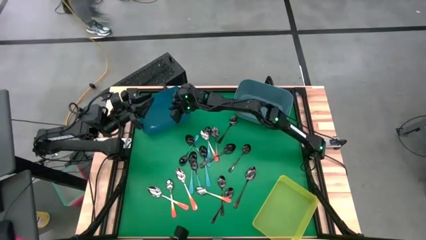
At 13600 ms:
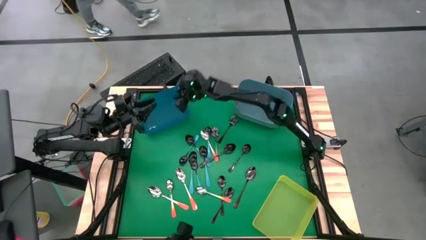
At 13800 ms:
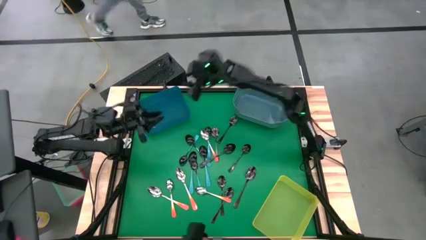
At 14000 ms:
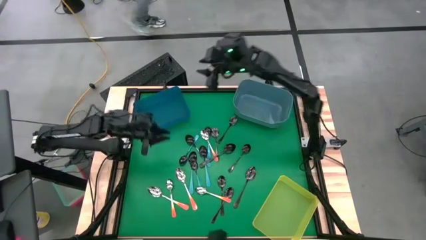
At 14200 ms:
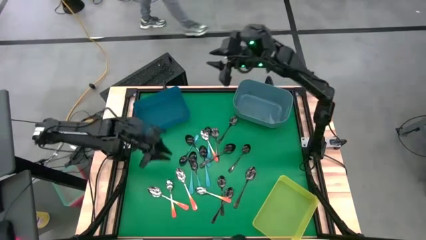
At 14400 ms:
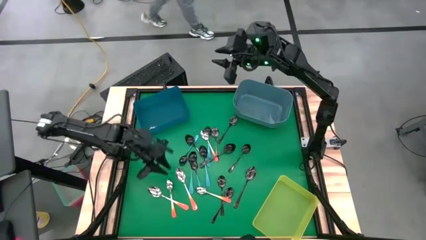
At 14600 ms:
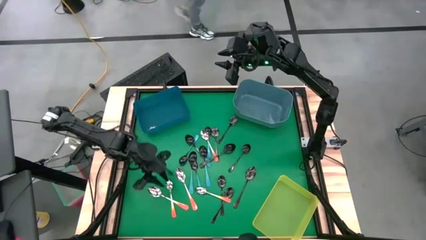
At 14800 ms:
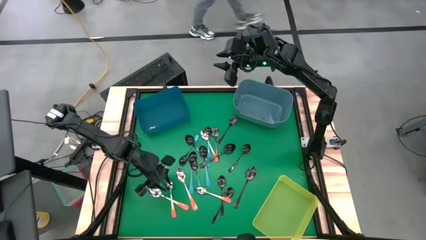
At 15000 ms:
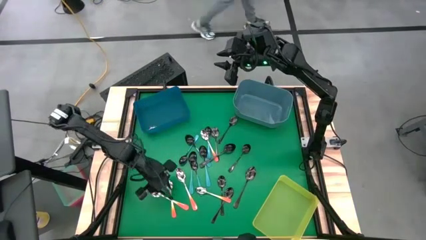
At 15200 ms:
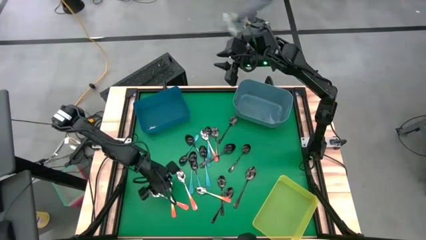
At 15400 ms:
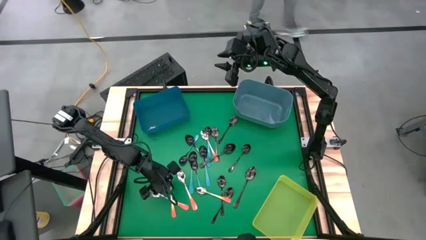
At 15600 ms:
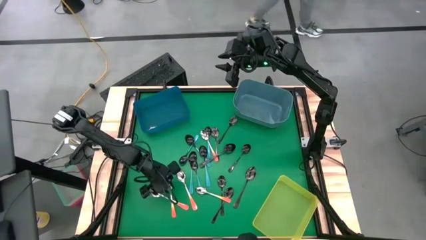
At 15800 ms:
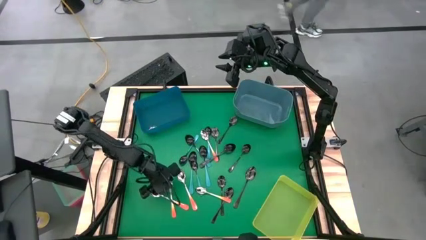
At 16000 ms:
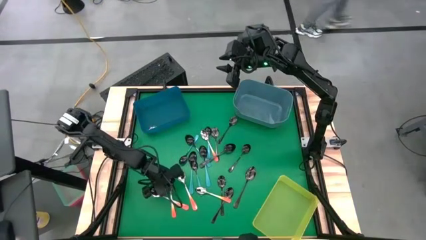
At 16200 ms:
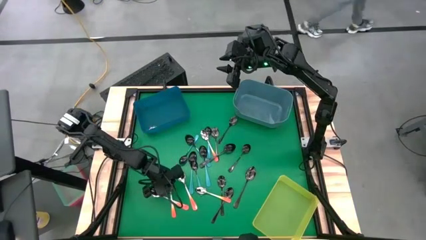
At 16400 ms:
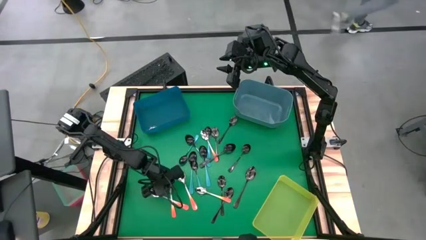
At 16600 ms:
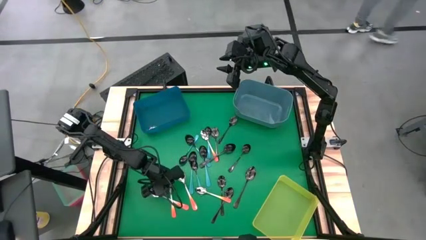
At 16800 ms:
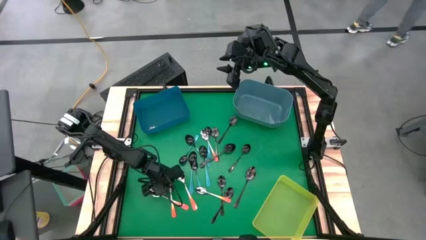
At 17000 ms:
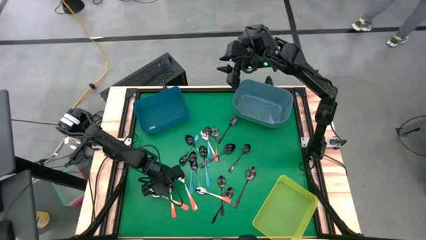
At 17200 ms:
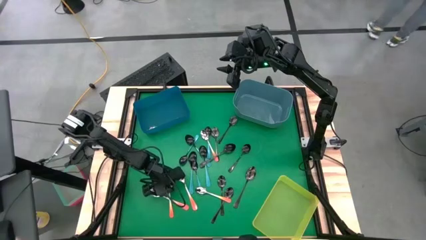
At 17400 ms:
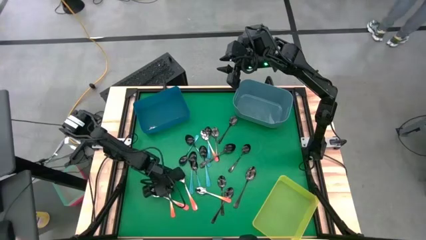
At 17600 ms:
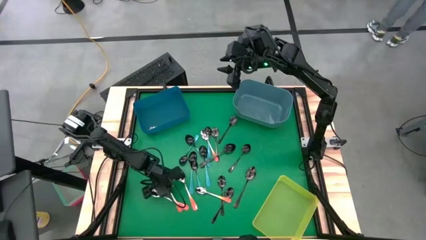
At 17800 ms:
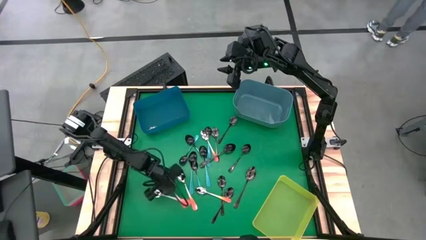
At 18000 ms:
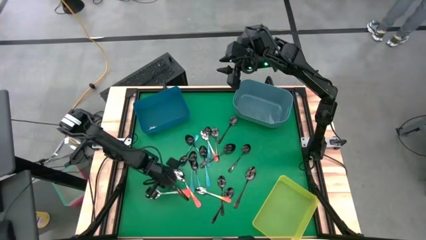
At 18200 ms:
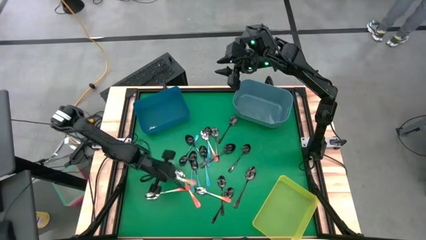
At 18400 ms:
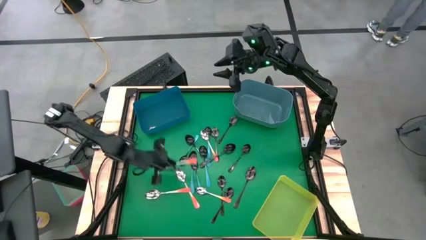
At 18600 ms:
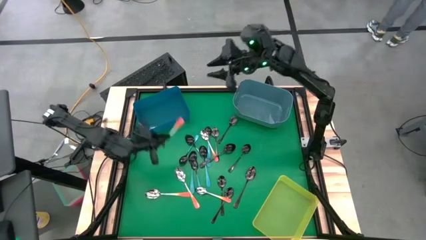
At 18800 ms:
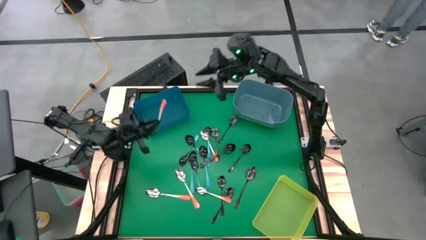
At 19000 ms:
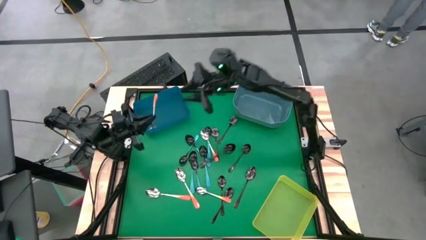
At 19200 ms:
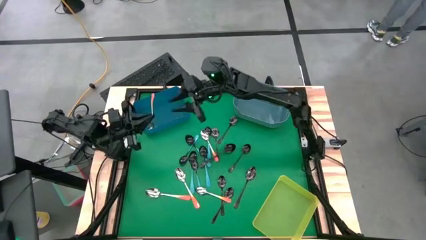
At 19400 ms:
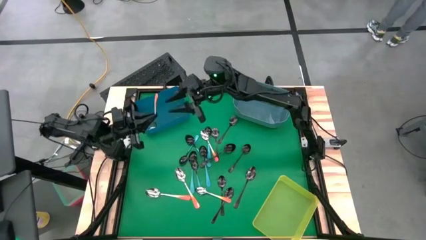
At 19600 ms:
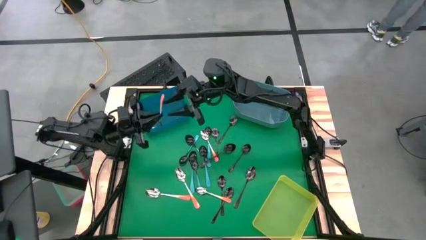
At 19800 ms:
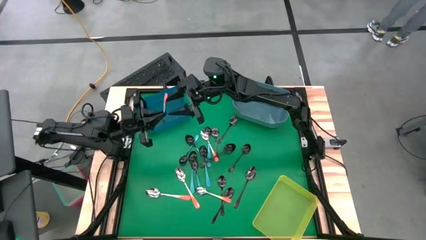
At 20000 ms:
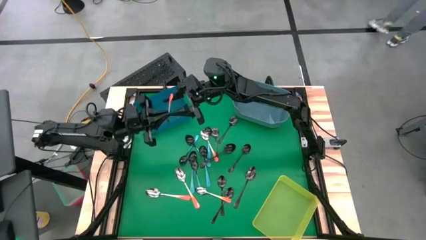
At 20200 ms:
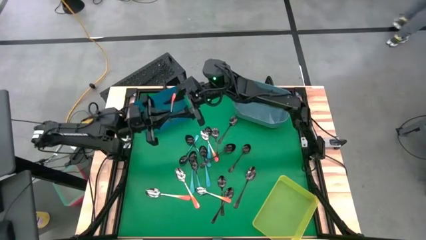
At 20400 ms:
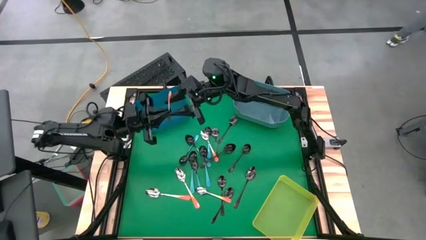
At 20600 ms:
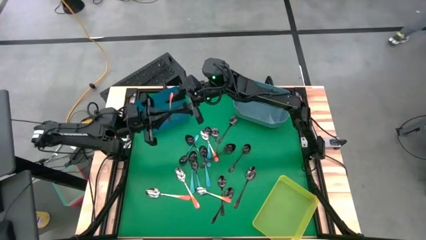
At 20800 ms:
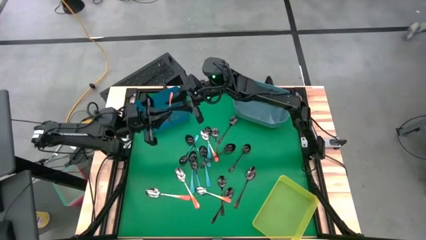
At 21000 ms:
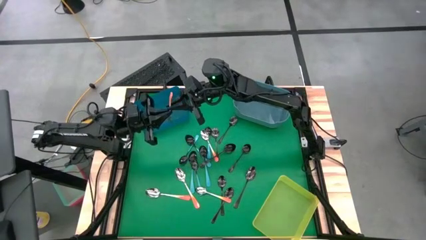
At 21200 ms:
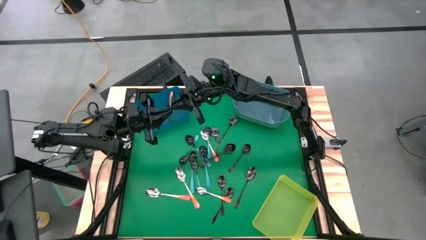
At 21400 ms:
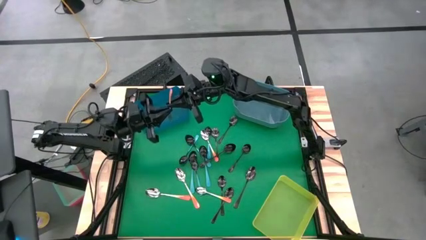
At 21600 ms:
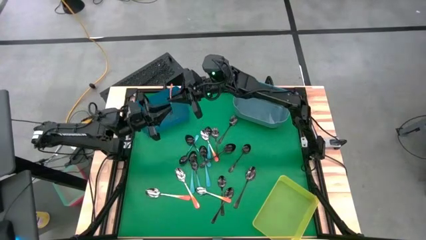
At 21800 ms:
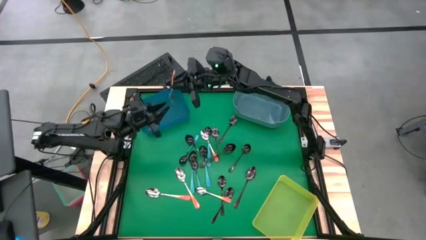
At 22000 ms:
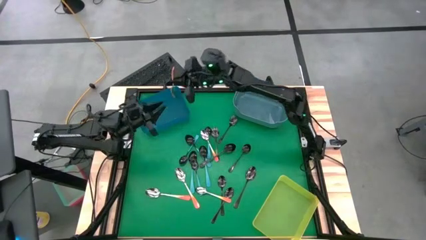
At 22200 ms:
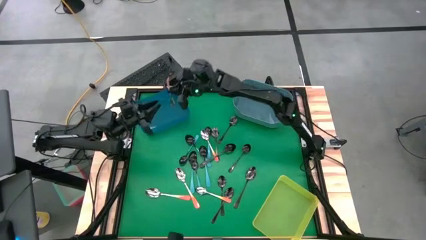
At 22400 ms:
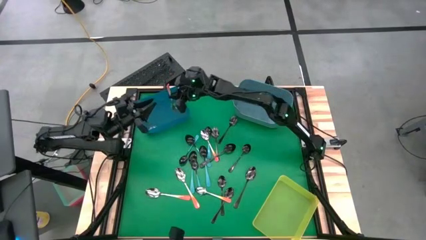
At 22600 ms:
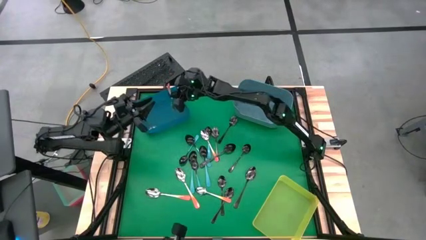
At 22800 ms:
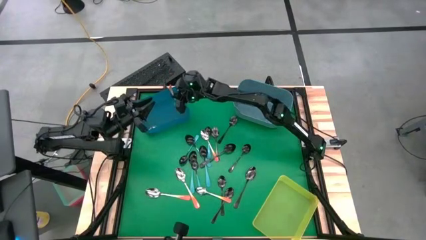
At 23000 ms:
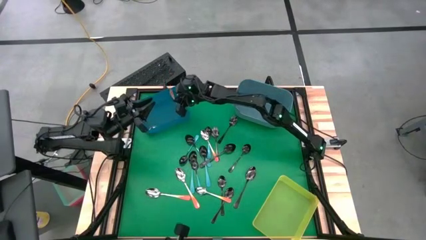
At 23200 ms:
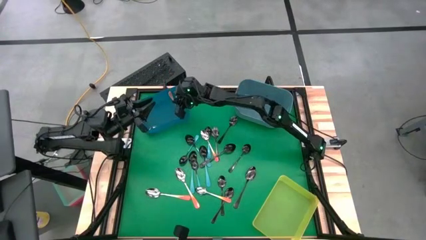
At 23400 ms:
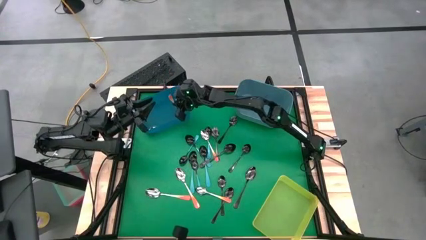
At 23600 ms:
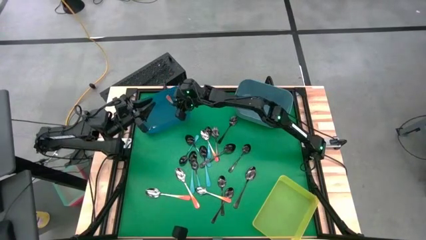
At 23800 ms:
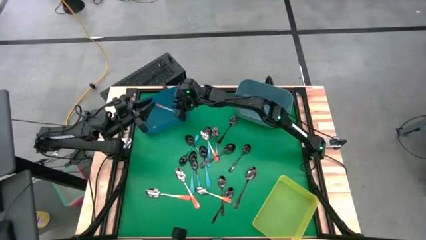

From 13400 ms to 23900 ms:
Task: Sort silverware by color (type)
Put the orange spoon into the dark blue bin

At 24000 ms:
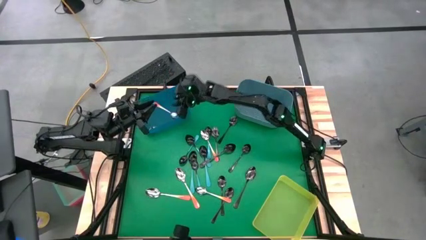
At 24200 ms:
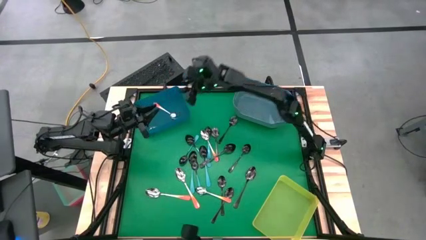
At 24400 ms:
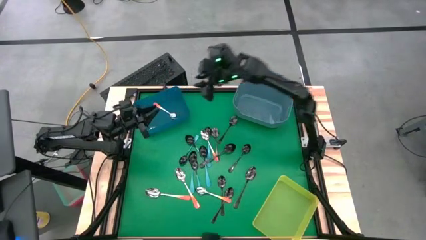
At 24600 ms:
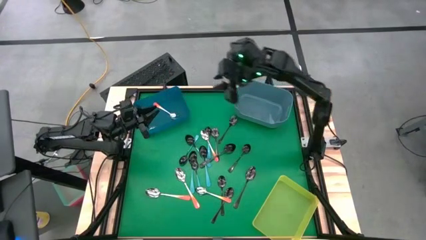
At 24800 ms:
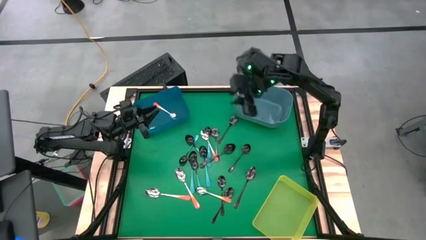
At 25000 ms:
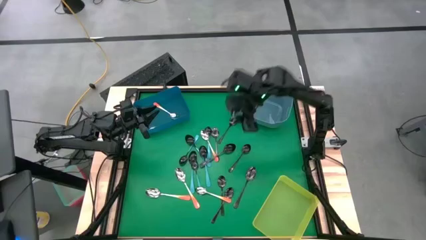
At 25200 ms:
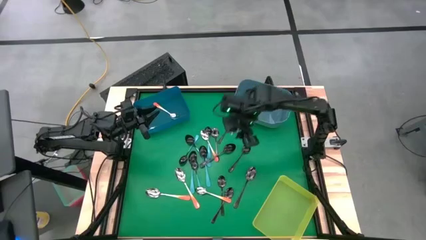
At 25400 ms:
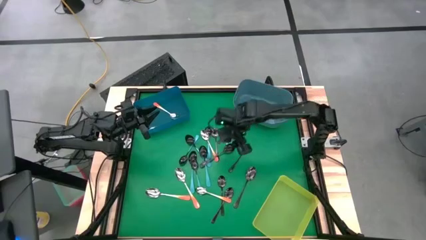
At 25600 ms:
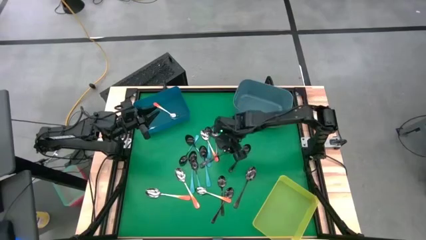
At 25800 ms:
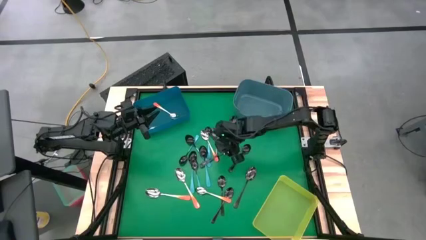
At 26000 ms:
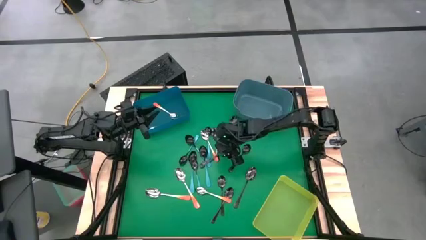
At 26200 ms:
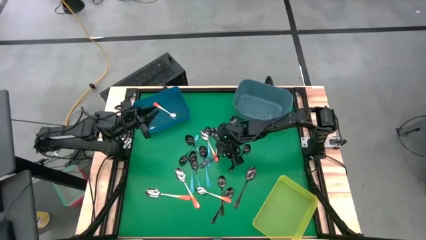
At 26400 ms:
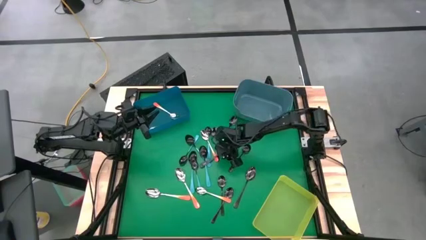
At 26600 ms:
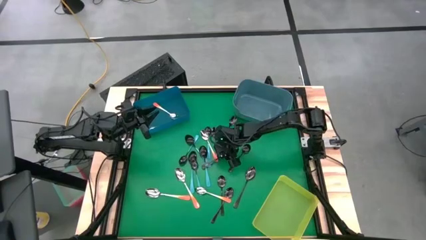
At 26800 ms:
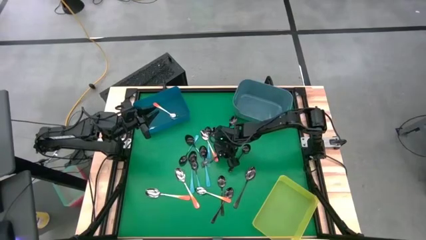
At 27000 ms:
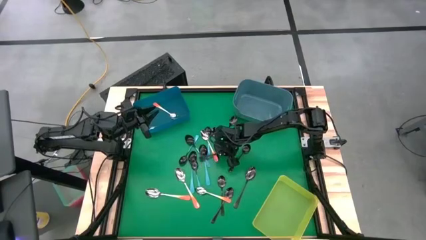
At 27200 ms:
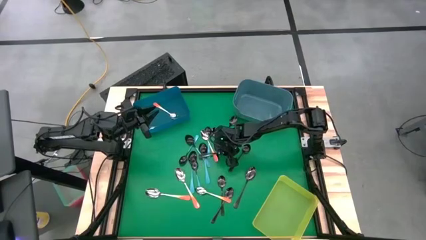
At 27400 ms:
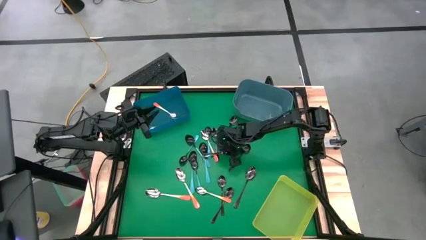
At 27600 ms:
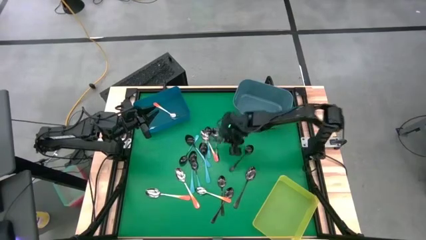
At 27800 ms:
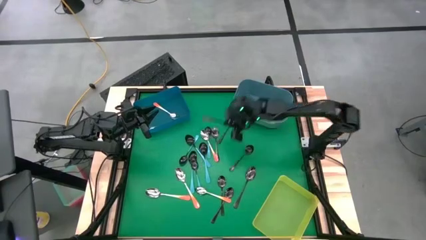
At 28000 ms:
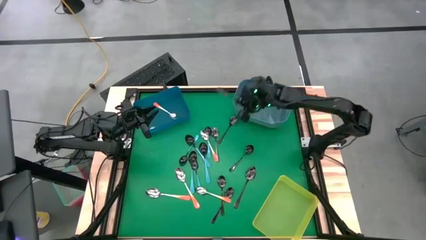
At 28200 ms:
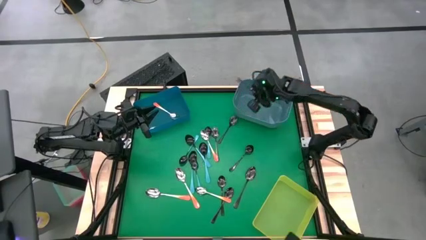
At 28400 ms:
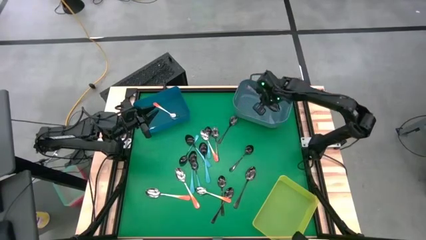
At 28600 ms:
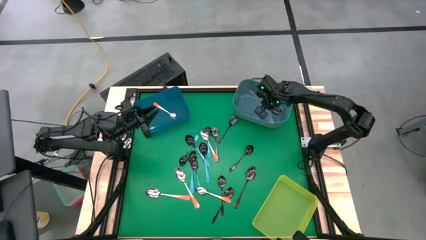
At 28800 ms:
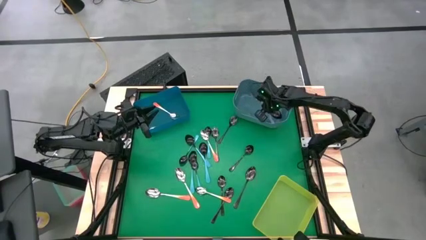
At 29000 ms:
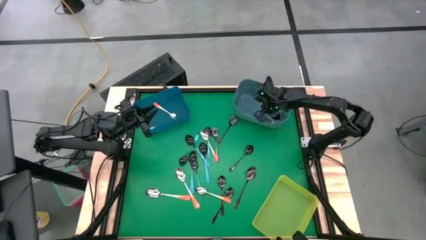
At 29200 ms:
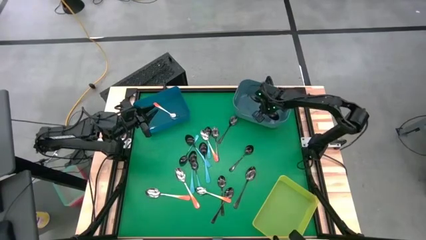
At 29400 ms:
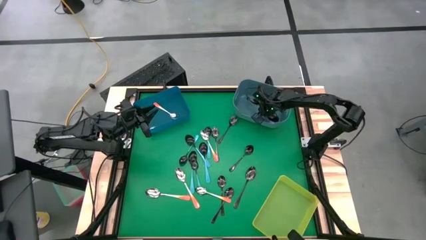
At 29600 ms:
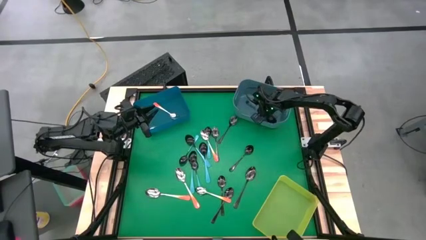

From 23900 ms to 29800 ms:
Put the black spoon into the blue bin
